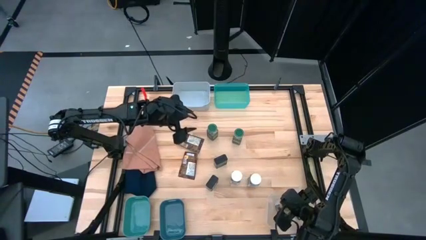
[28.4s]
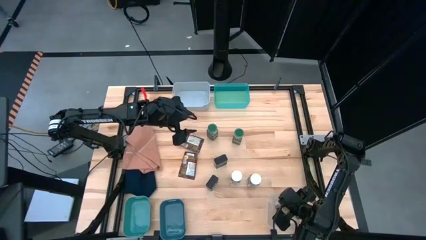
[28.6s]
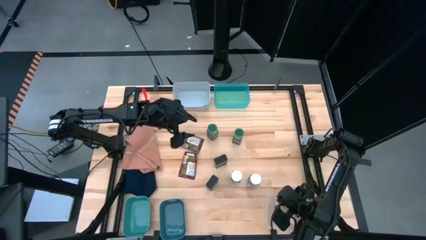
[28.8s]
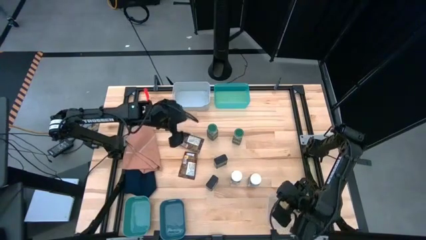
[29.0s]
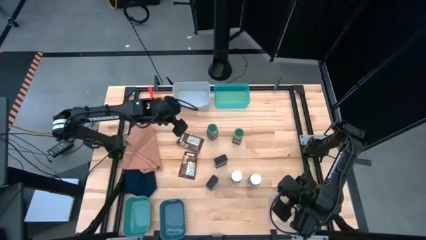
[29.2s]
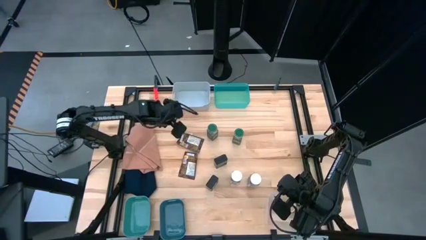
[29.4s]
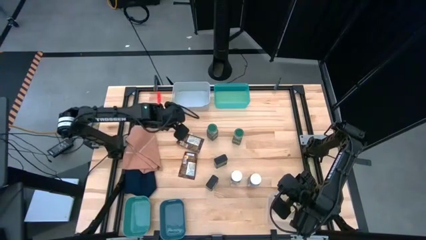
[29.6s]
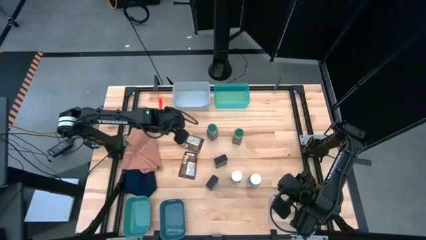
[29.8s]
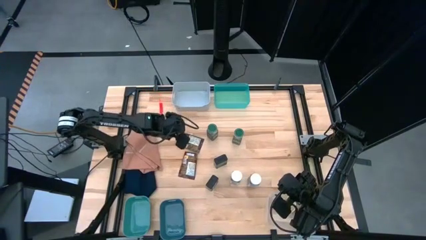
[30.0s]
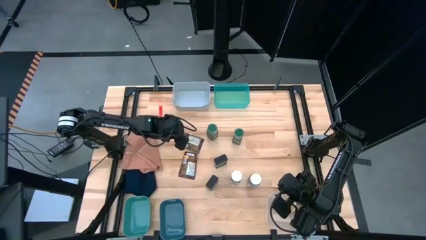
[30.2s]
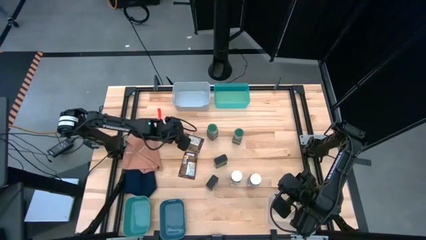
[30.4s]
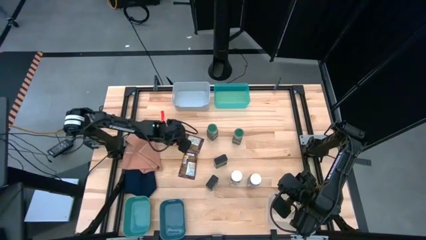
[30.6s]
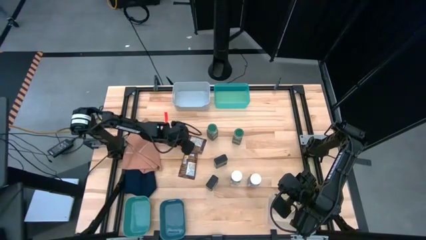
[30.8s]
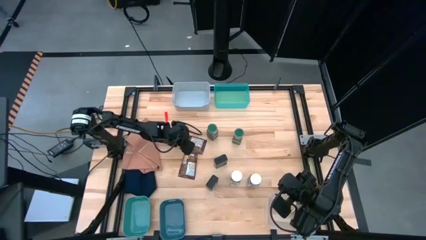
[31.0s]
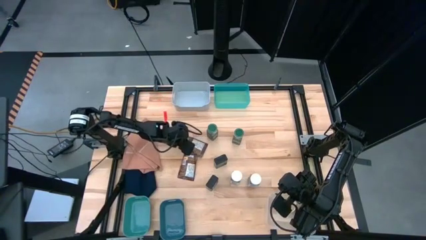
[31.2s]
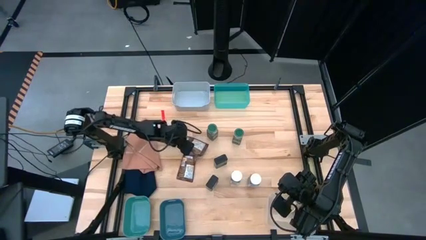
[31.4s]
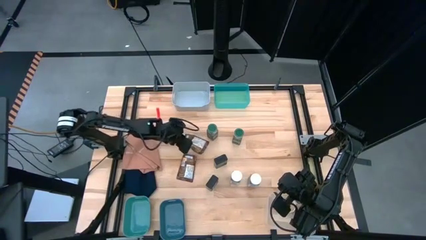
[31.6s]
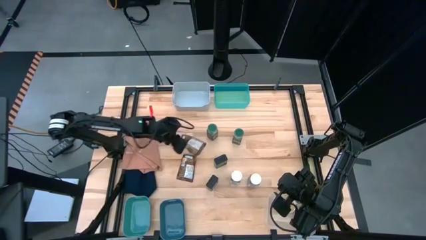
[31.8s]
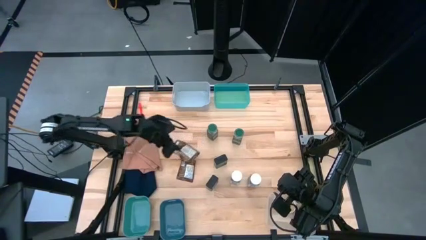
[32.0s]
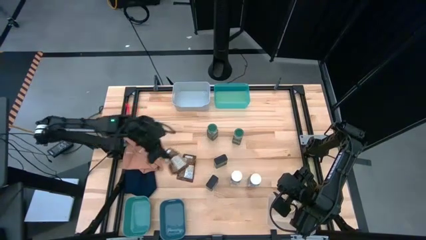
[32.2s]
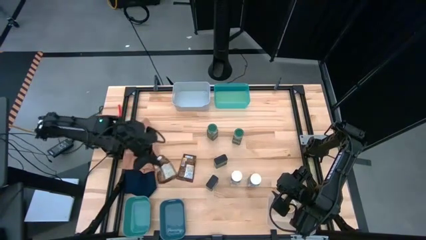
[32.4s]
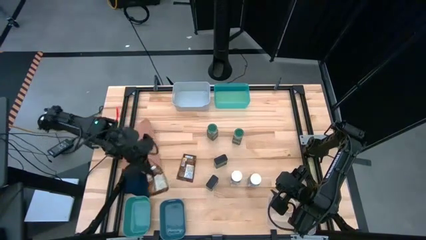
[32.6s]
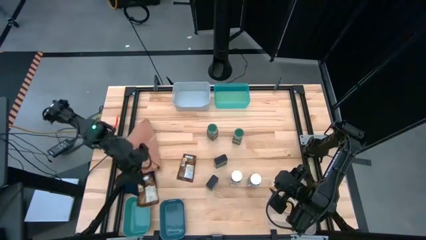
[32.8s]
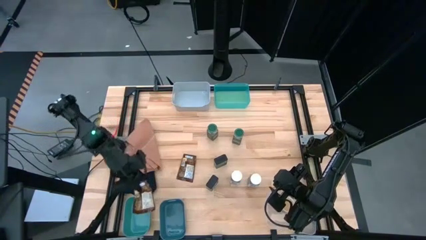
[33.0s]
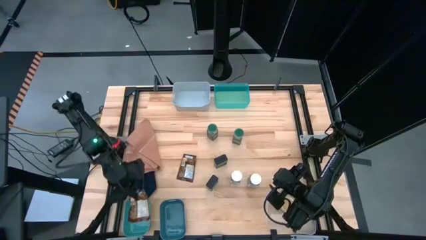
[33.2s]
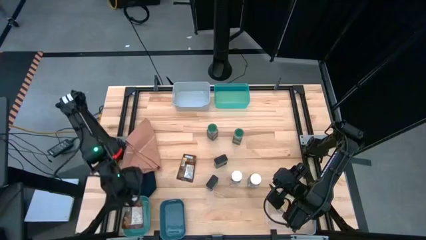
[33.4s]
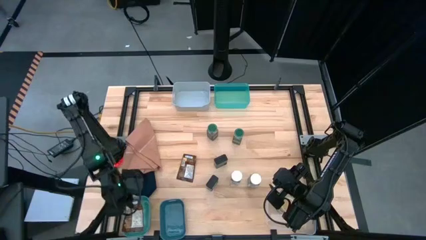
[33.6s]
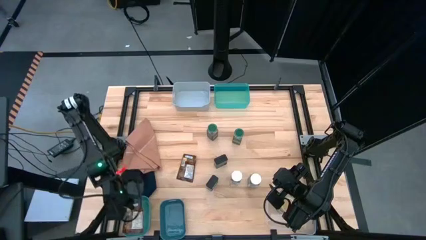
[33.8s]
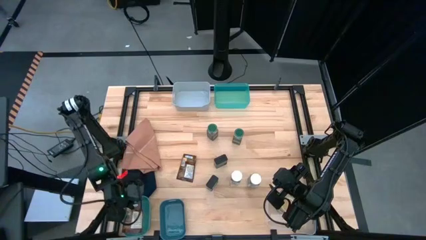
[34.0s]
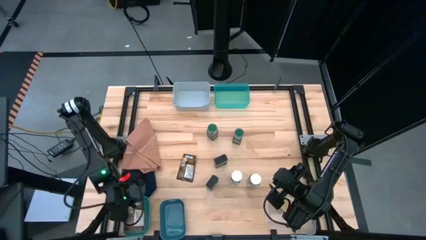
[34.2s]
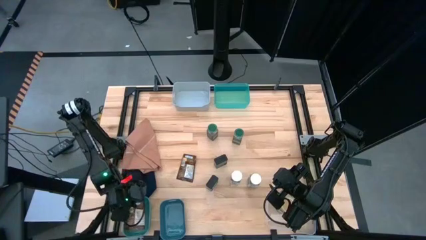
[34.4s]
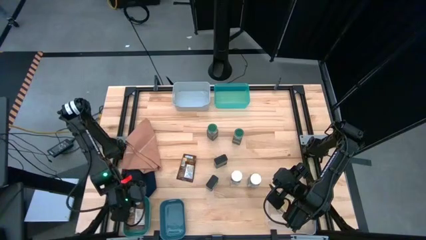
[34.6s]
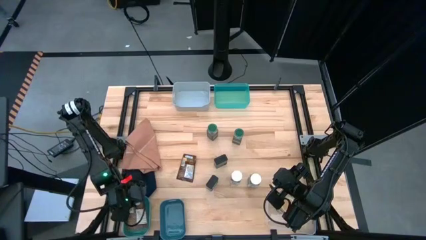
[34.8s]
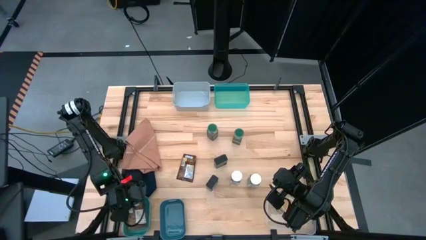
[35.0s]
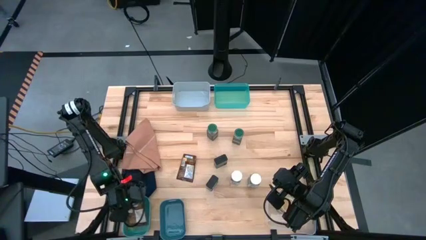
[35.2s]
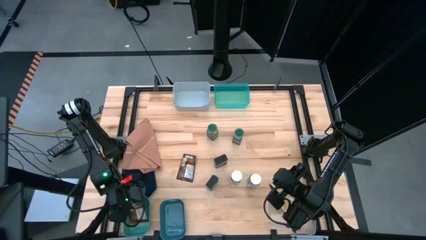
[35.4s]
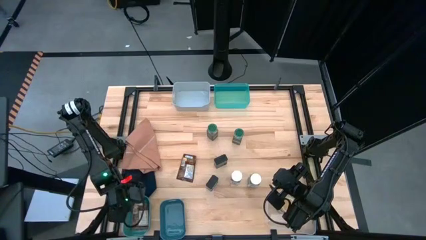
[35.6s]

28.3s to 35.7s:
Task: Sort spices by type
Put the top orange spice pack into the green bin

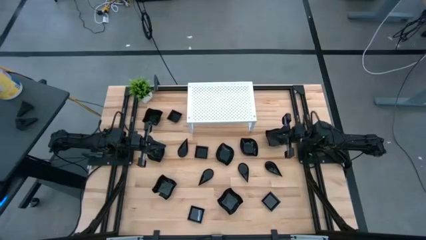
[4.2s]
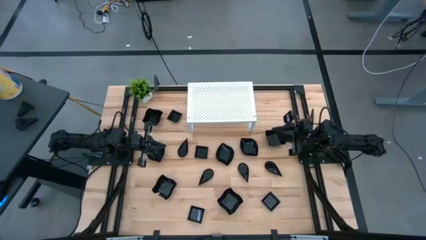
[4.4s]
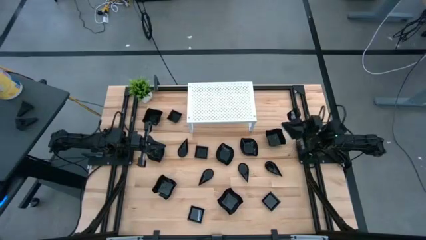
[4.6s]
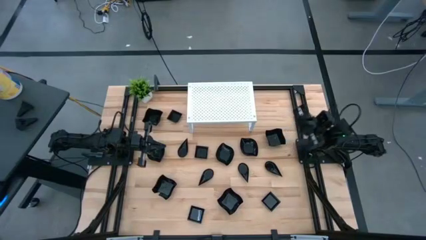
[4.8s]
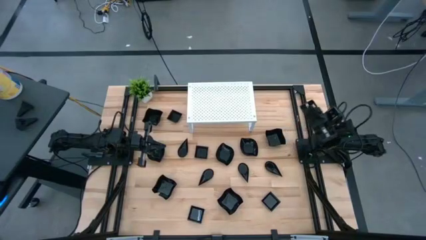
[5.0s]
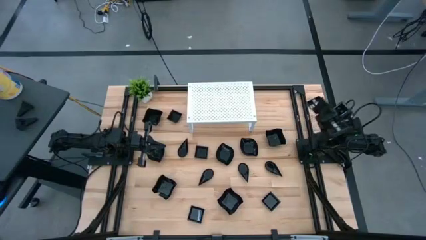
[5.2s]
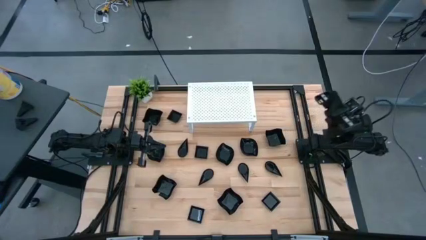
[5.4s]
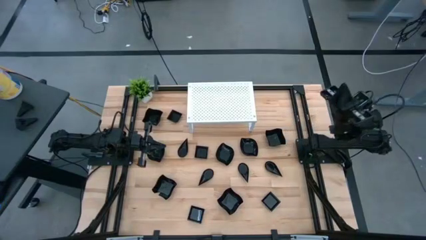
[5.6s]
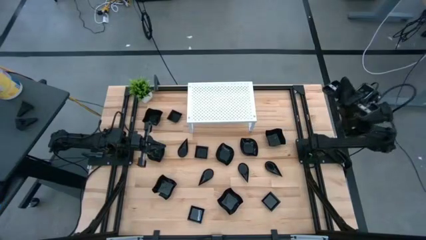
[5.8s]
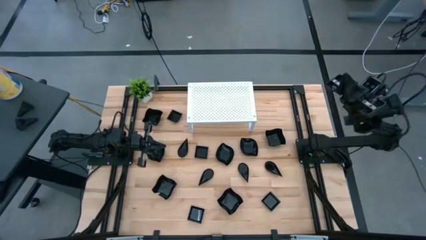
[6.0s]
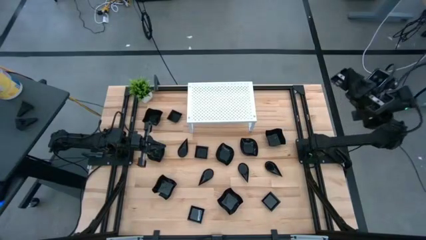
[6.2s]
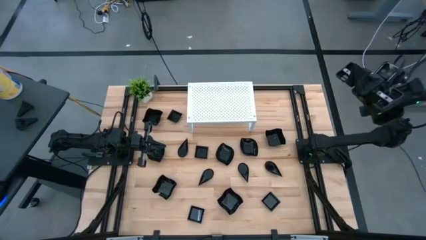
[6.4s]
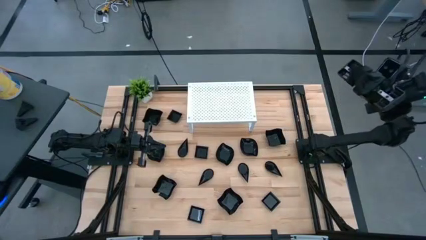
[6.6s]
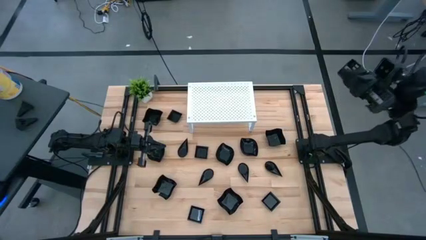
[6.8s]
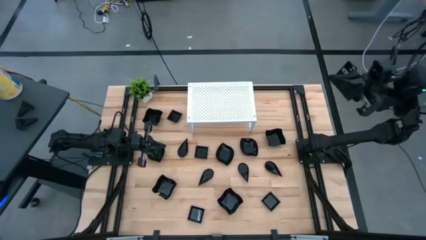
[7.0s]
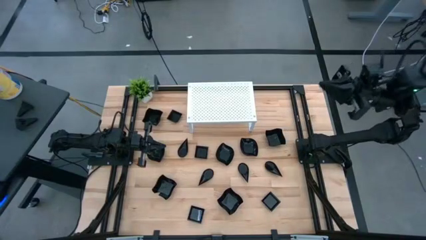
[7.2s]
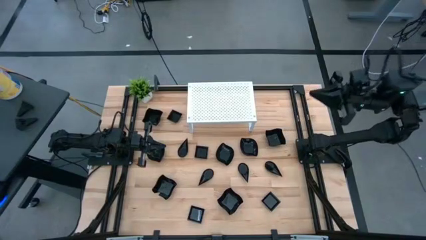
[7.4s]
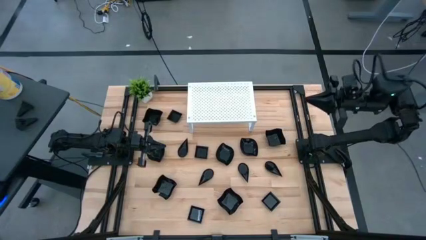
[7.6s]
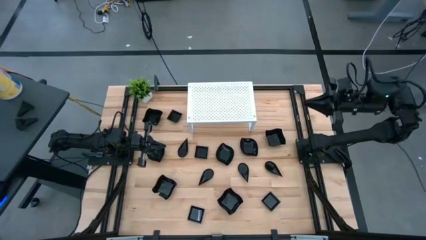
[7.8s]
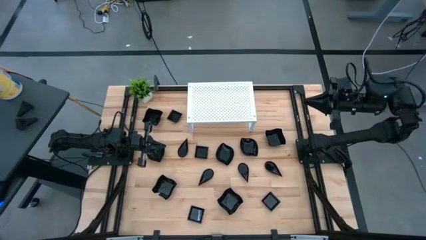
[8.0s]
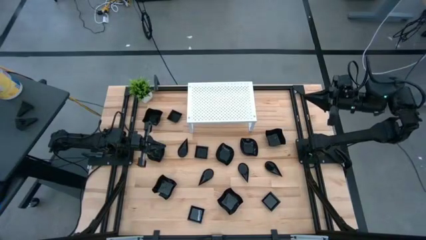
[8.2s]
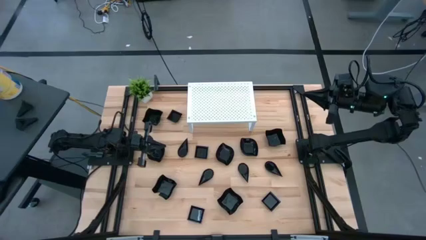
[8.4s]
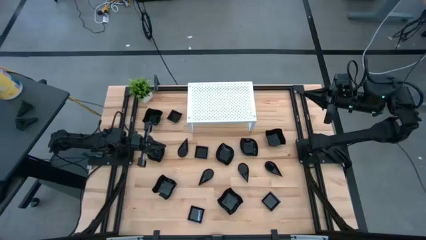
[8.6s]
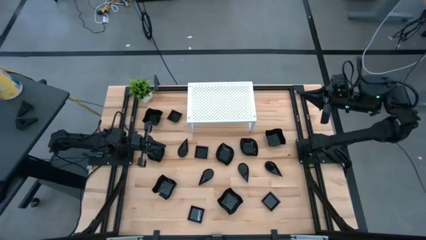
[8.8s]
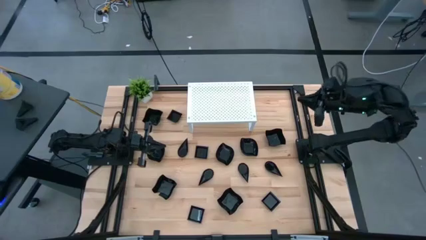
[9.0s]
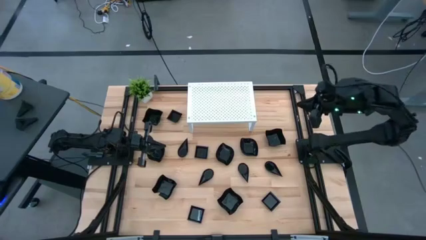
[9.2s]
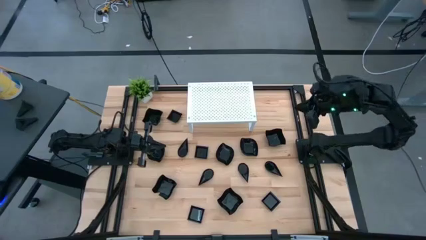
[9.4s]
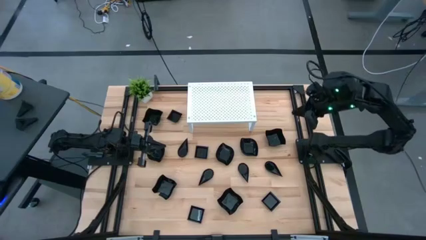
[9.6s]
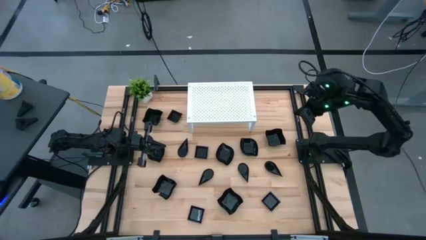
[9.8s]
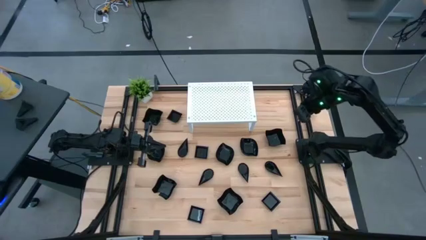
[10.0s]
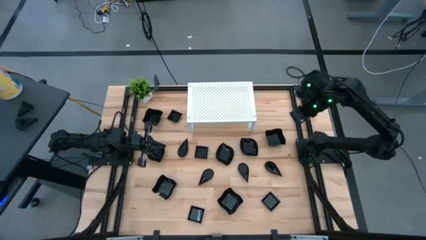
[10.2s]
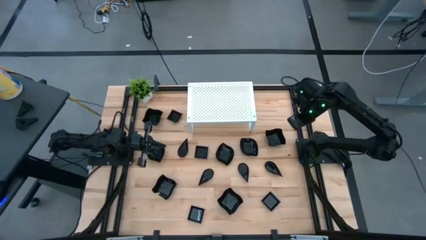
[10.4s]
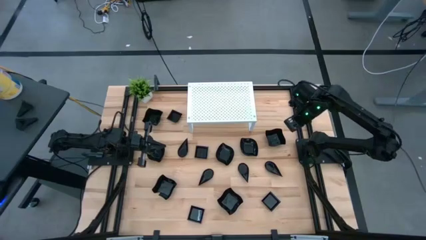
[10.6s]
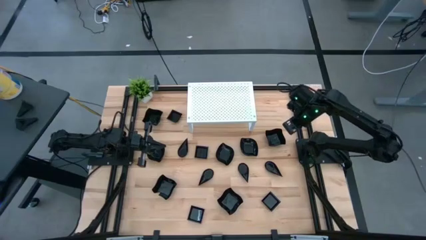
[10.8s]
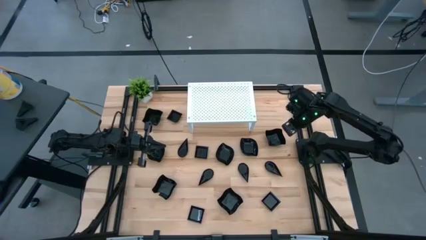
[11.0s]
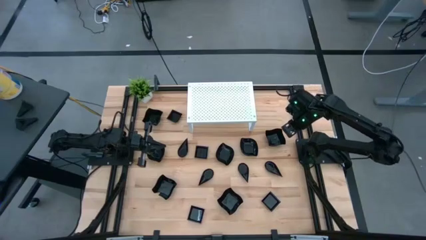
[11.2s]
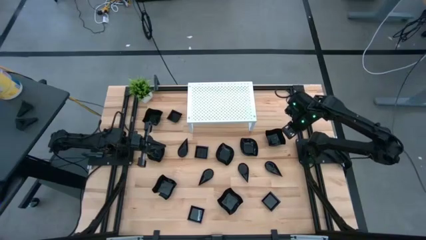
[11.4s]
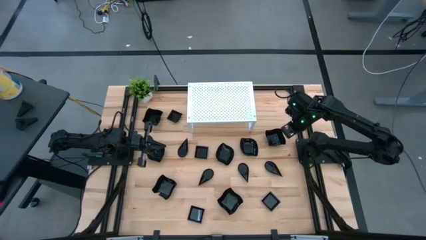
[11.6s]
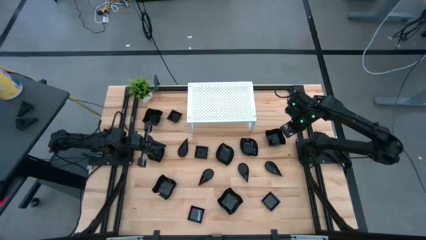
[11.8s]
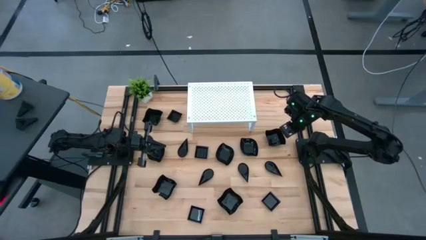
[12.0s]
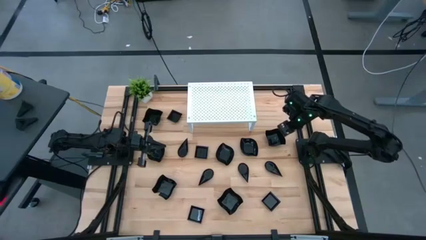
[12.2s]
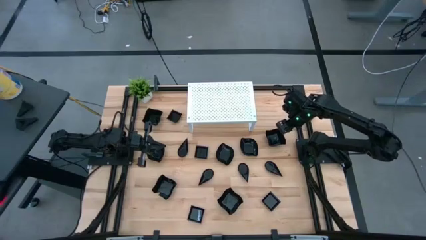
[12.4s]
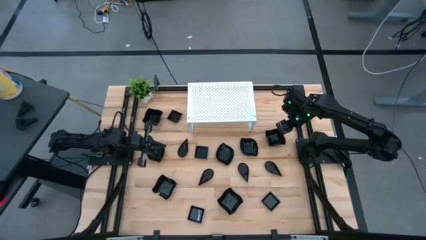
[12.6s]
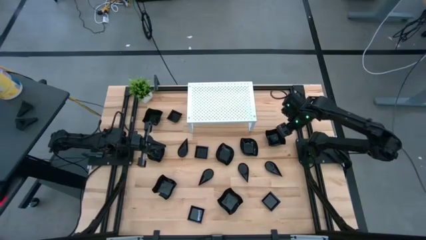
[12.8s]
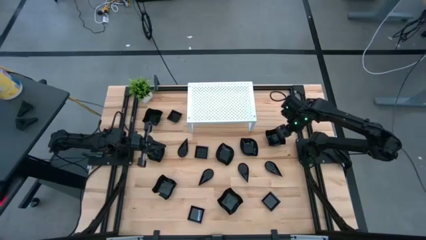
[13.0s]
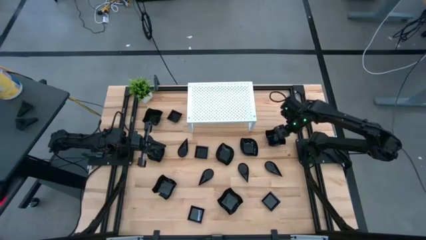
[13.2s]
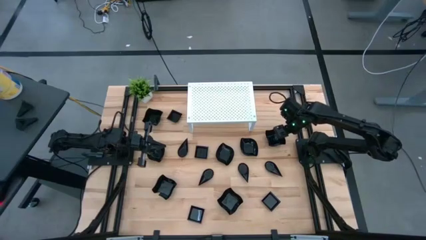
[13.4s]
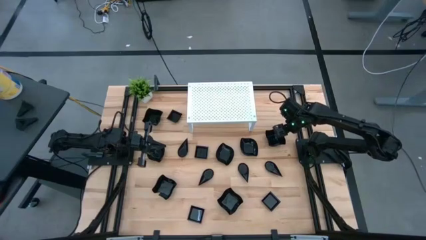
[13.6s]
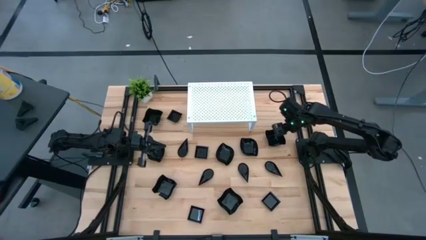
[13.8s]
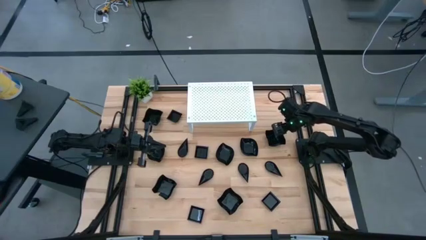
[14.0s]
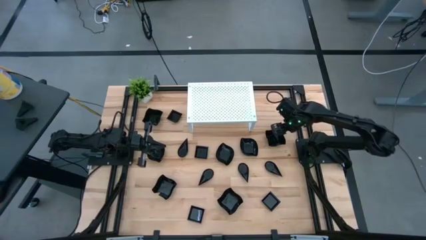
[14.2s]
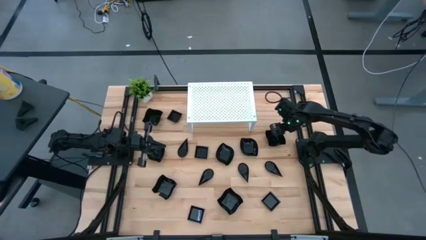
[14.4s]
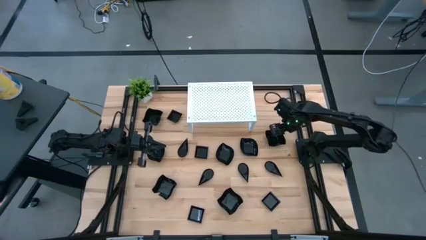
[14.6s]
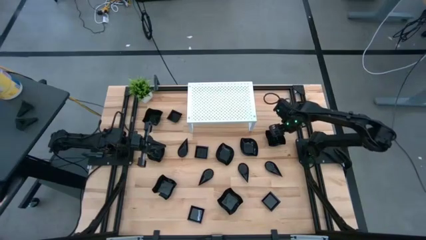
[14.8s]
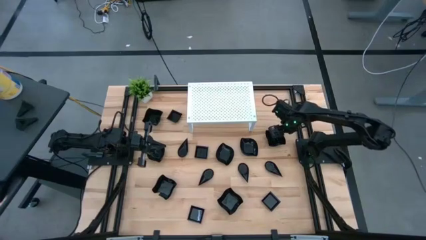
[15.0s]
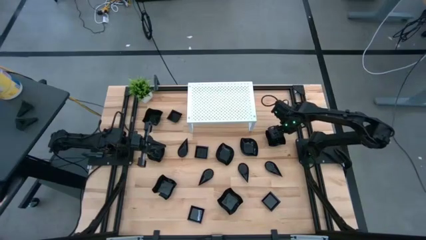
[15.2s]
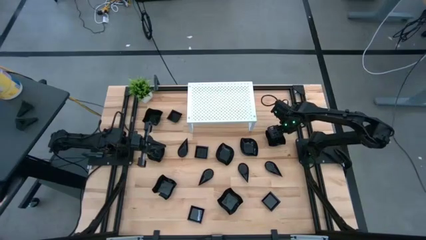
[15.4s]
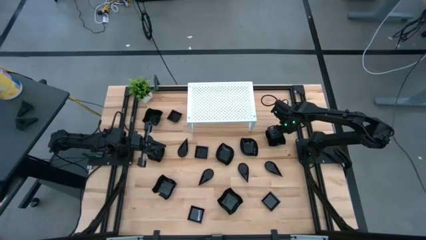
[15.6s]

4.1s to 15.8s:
Task: Pick & Place Mini shaped plates
Put the distorted square plate on the shelf
